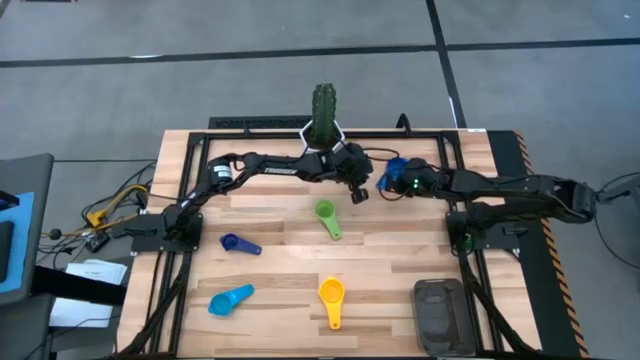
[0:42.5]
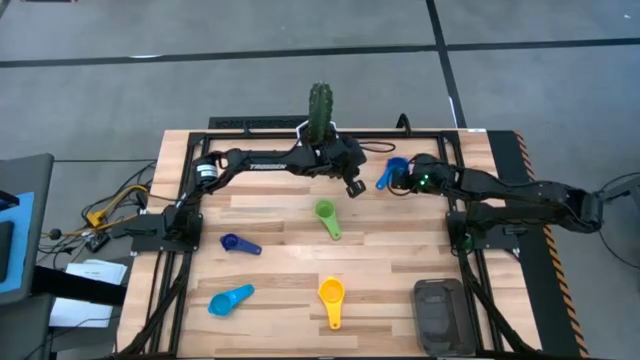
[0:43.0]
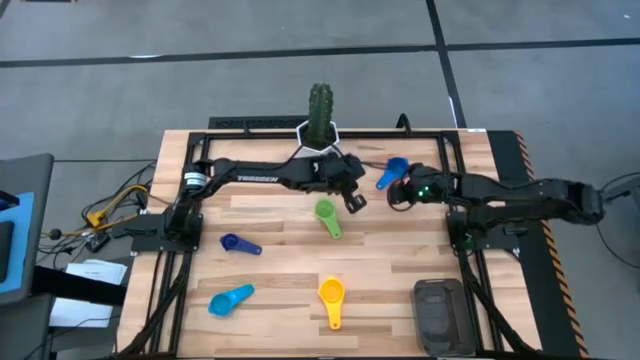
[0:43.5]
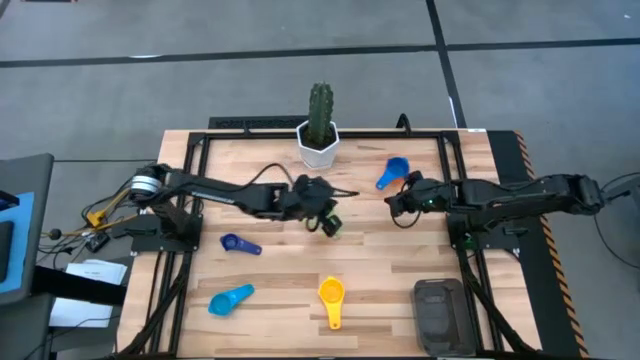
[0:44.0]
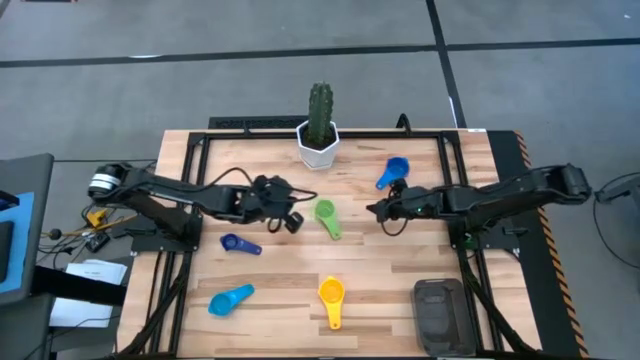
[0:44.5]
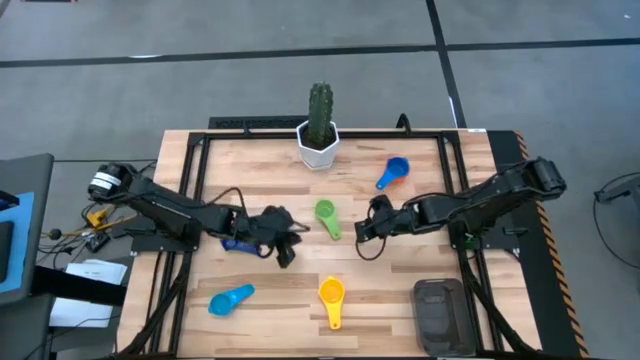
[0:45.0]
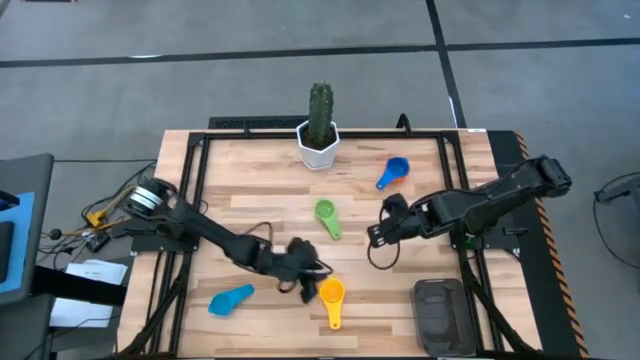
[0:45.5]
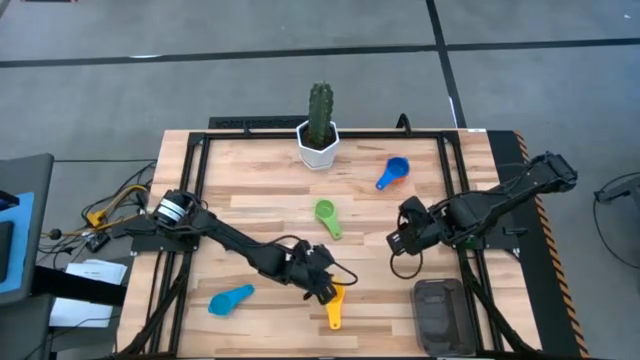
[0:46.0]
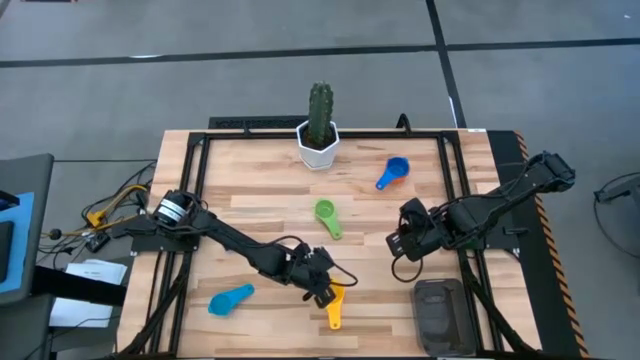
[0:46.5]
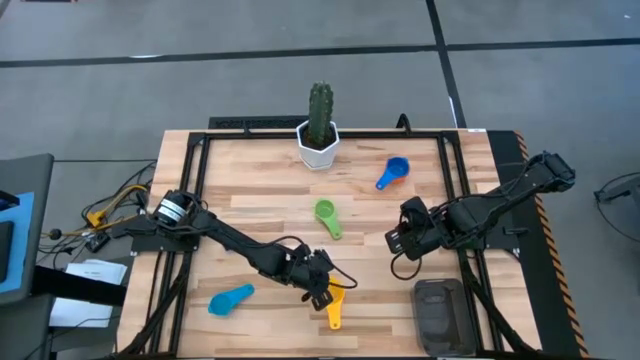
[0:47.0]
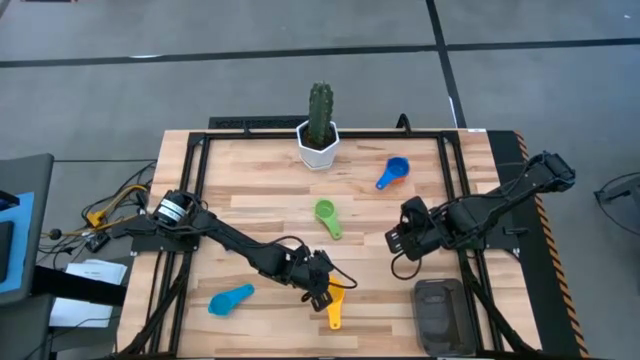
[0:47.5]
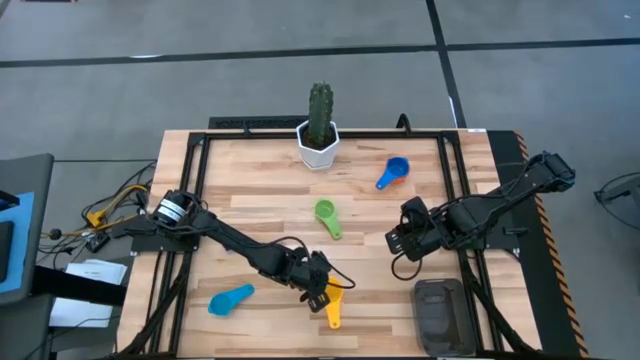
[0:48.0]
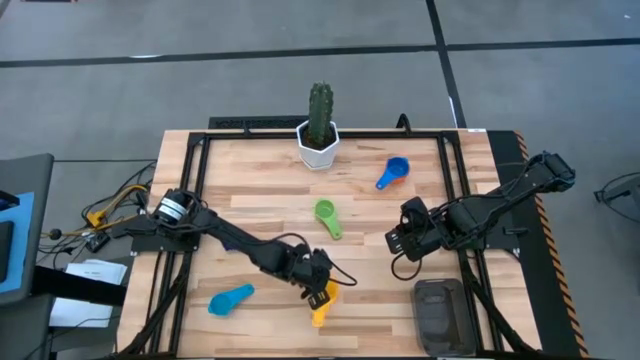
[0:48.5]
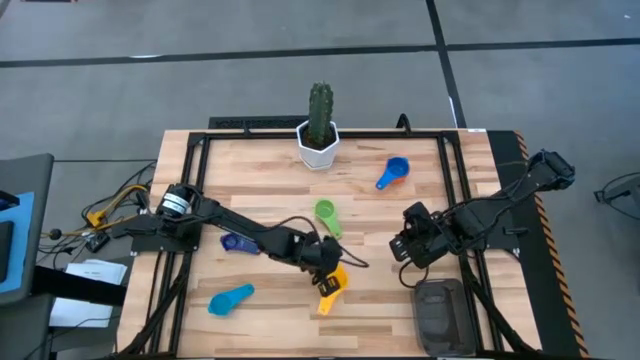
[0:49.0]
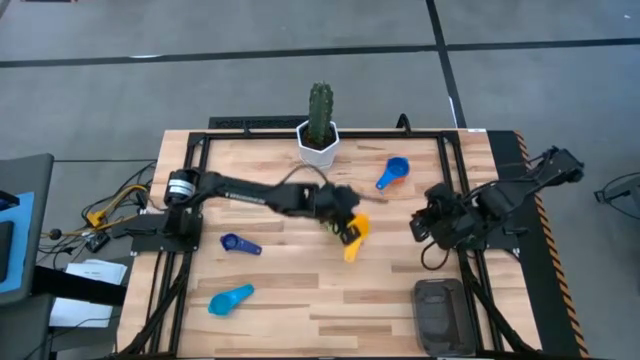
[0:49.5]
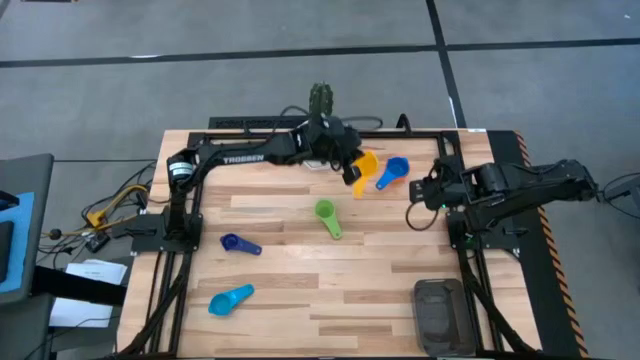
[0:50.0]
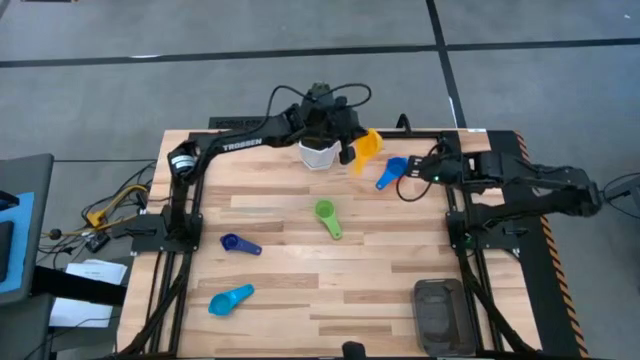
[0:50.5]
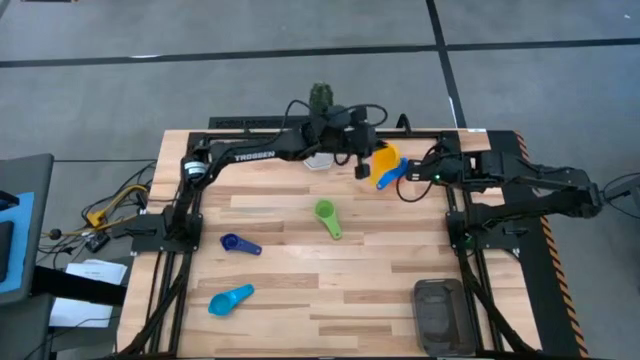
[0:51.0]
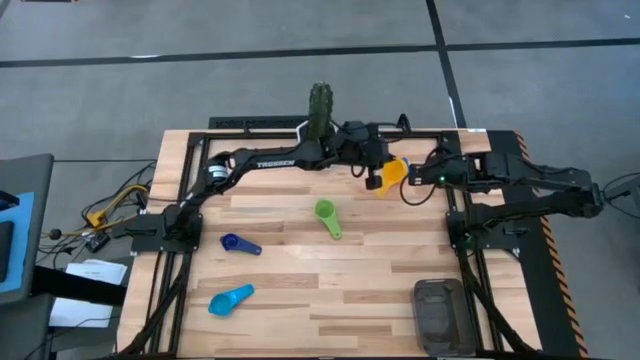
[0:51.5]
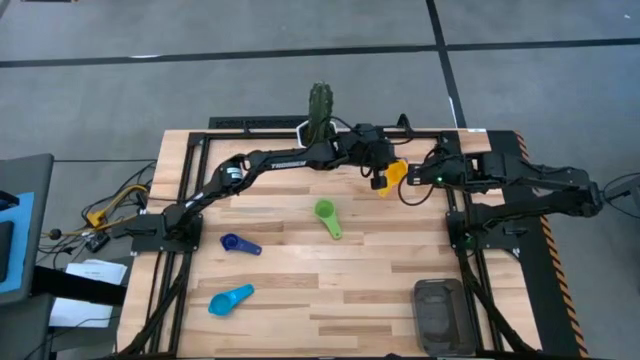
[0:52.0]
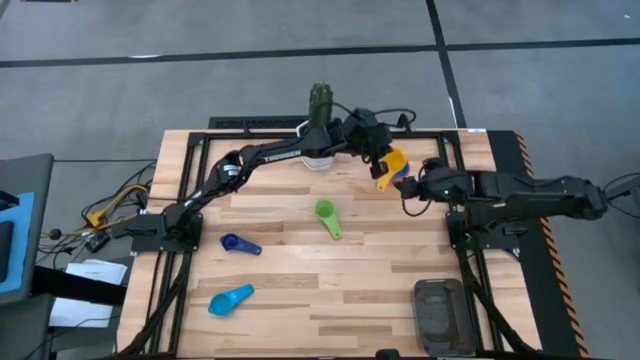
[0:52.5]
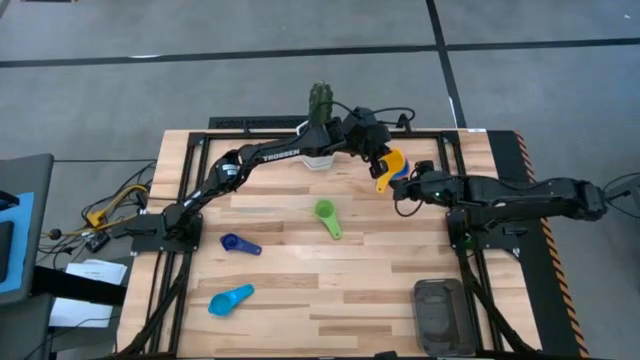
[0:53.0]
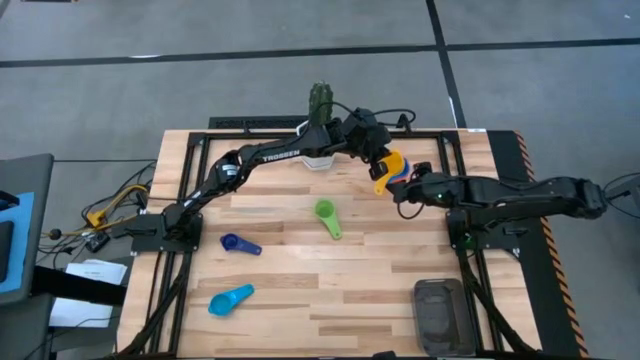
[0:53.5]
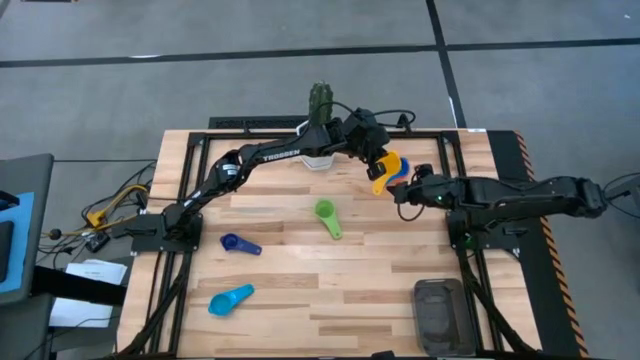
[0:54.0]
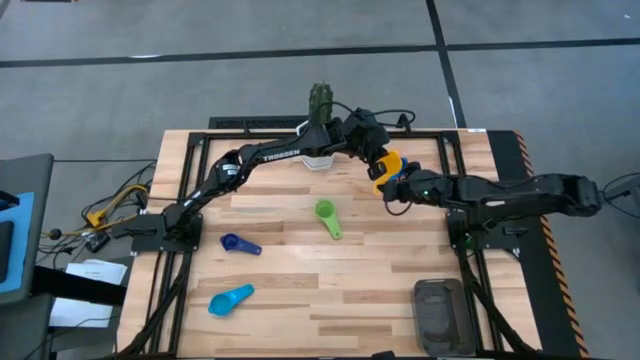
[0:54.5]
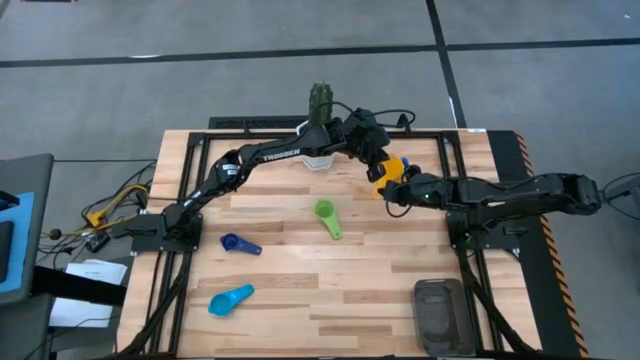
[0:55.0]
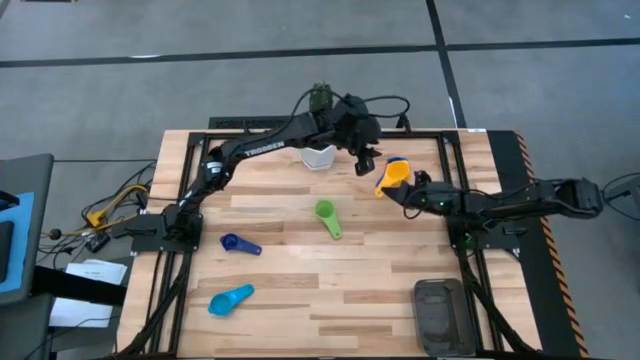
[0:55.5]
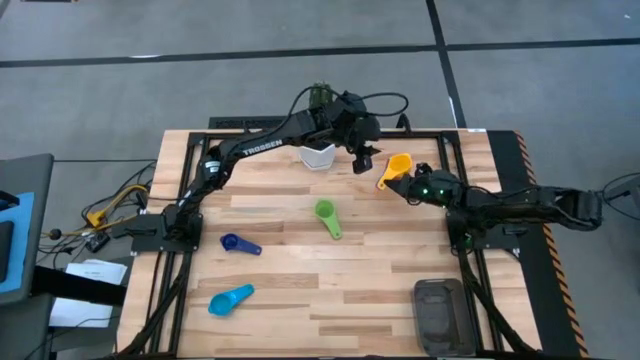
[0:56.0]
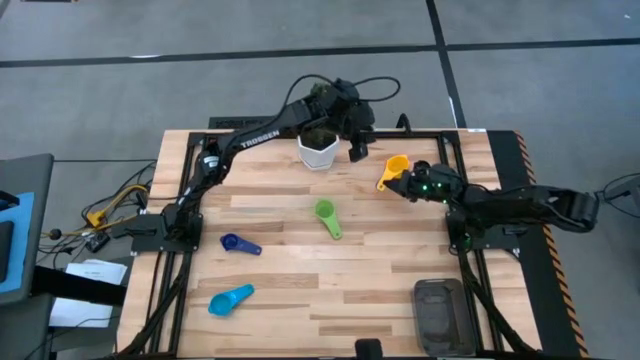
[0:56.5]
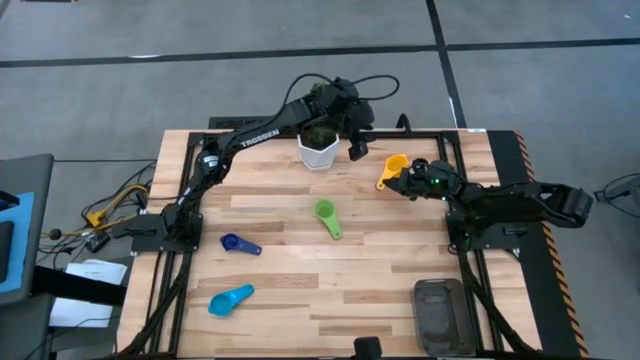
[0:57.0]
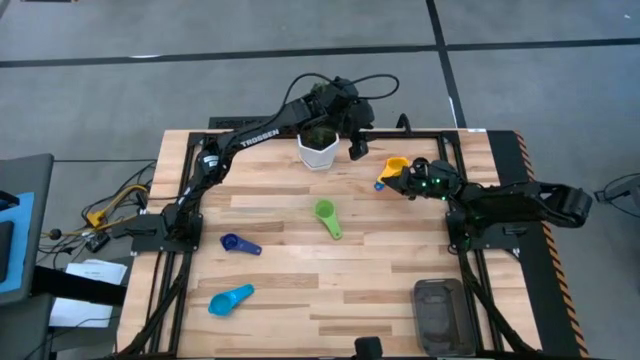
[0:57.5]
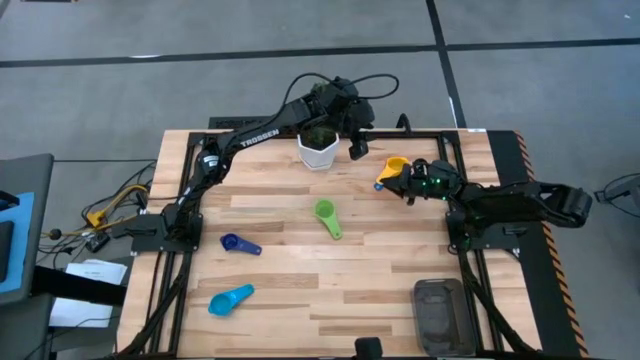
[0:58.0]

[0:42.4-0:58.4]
Task: Nest measuring cups in basket
Stack the yellow measuring cup on top of the blue measuring cup

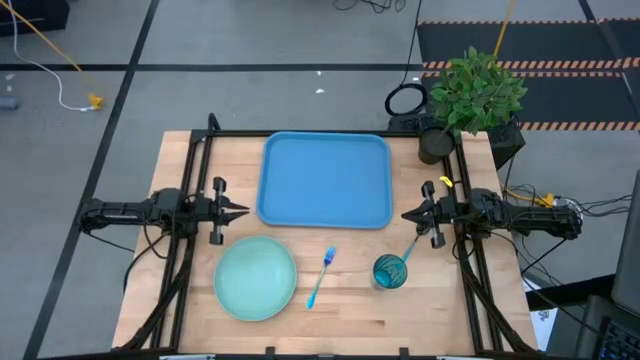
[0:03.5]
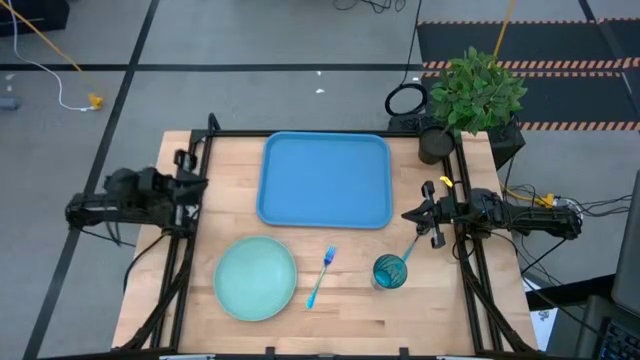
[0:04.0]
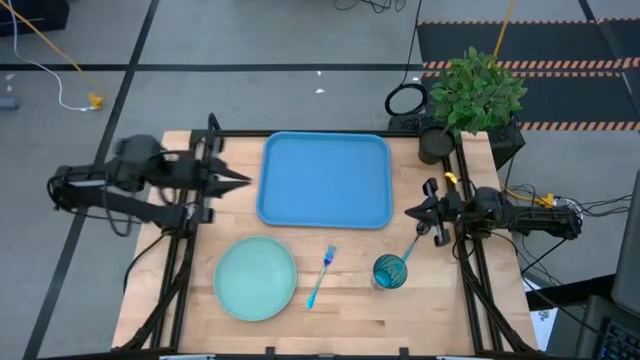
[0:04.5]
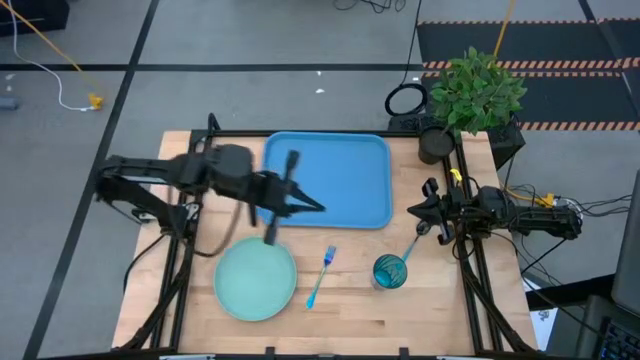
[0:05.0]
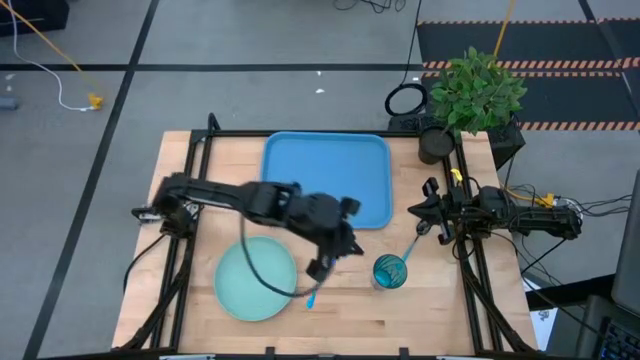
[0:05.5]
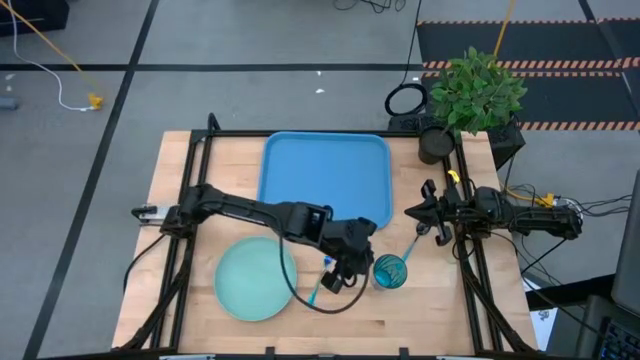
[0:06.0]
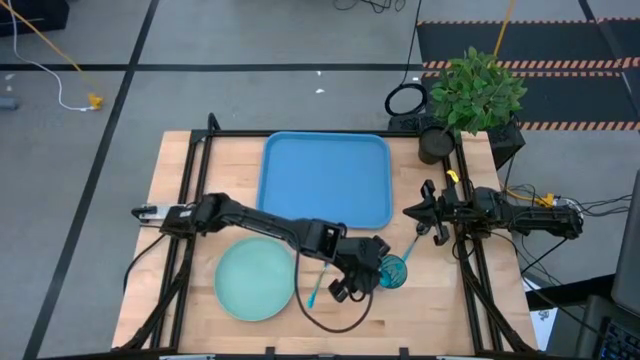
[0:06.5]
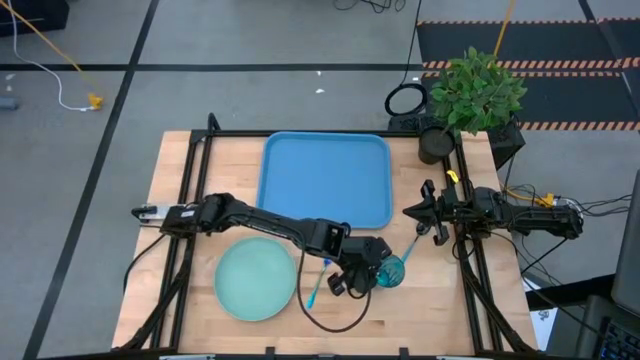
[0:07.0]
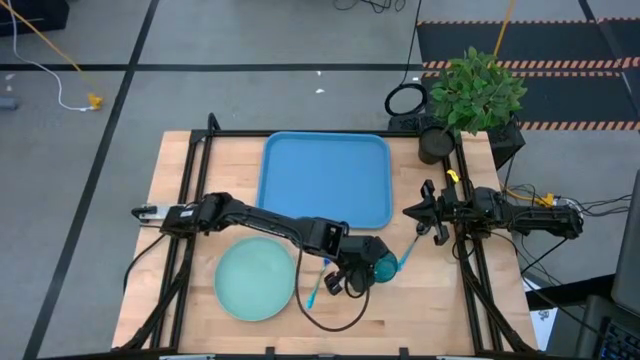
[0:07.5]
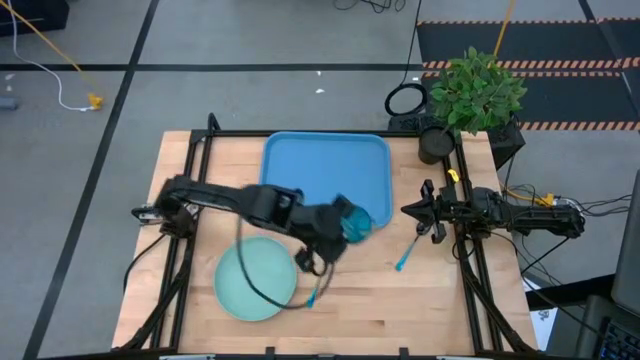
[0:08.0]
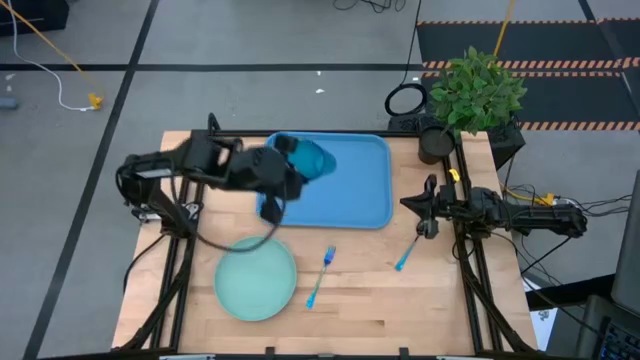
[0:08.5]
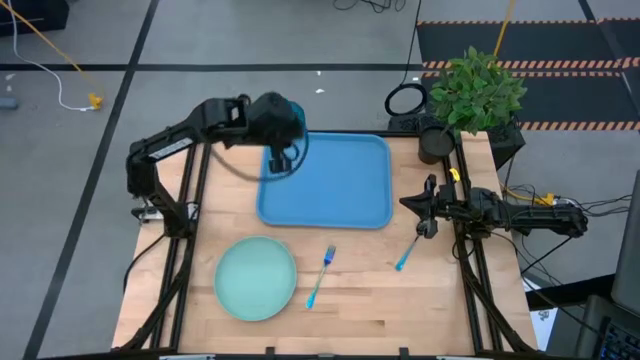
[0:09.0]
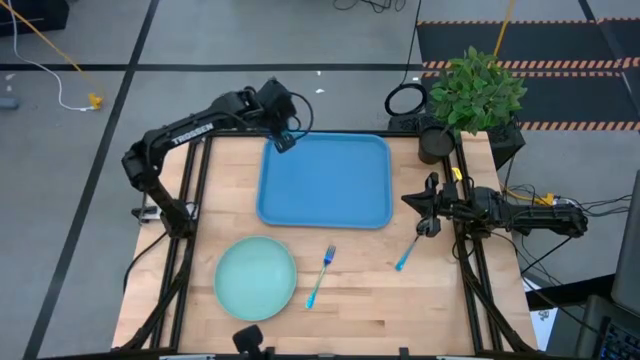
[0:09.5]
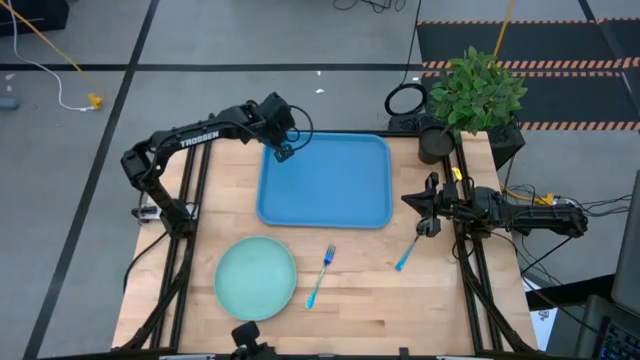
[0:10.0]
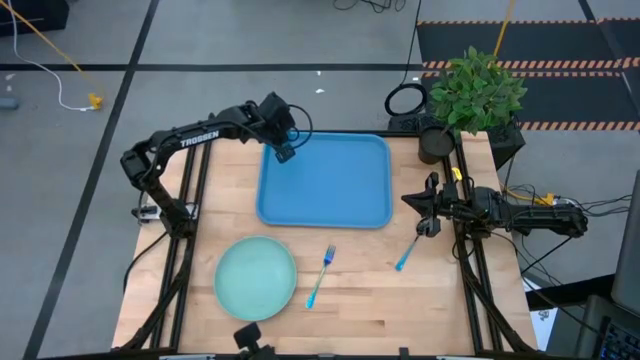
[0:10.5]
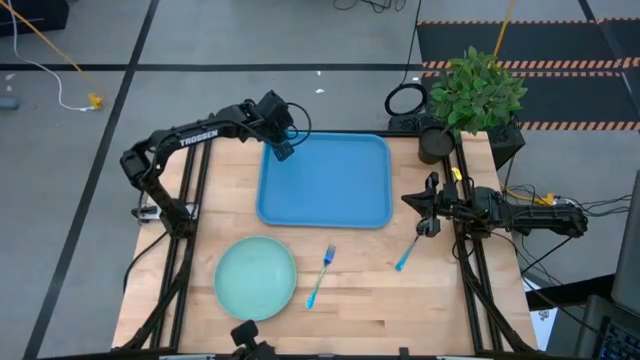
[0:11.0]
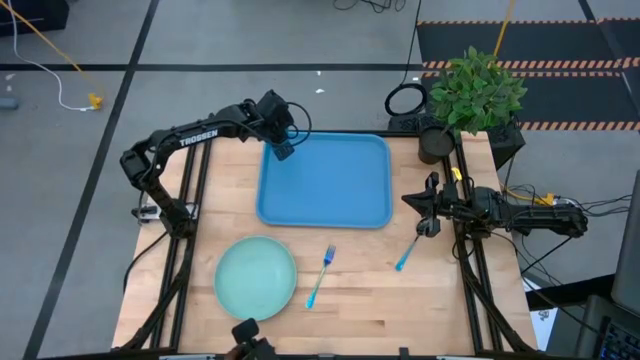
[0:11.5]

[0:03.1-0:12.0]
Task: Pick and place plate/cup/fork/spoon on tray
Put the cup on the top right of the blue tray
